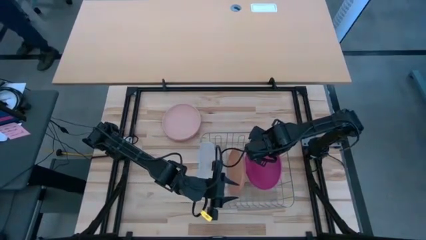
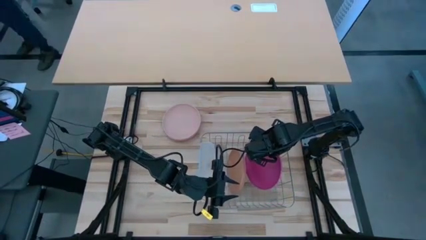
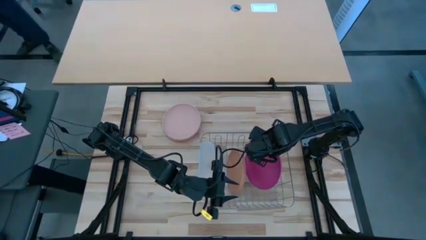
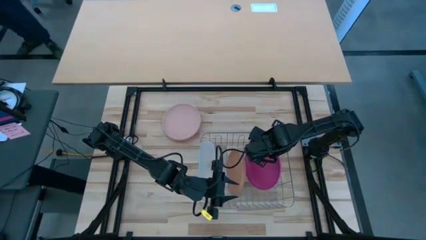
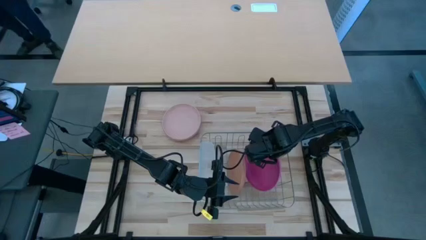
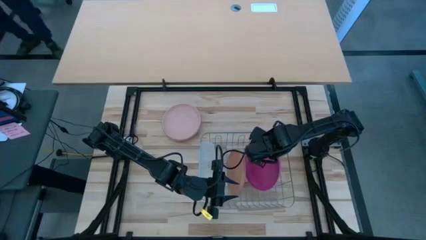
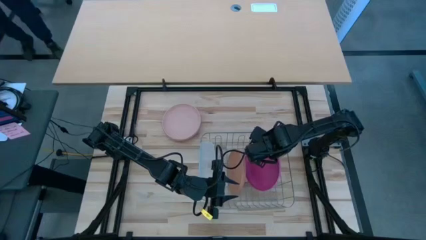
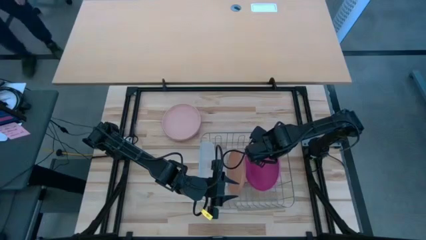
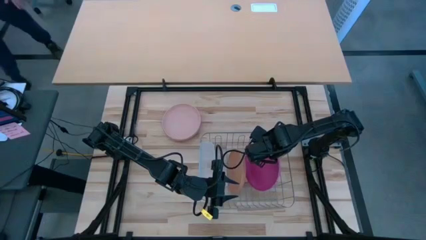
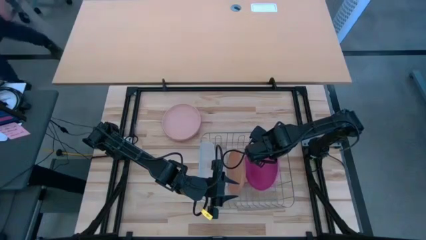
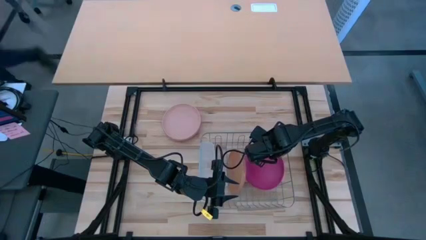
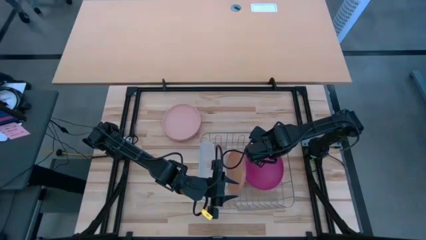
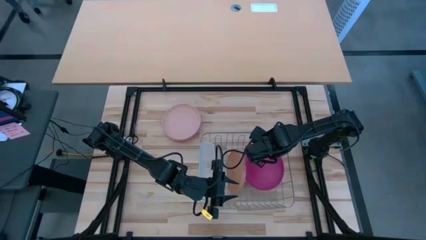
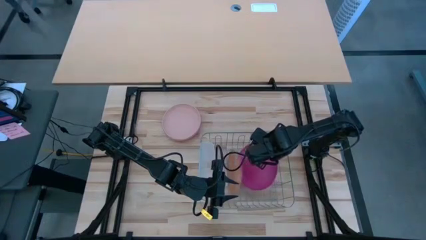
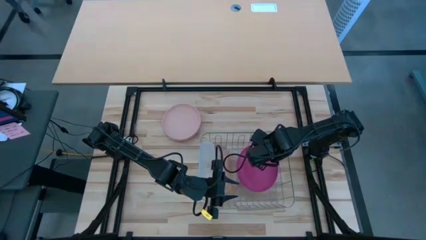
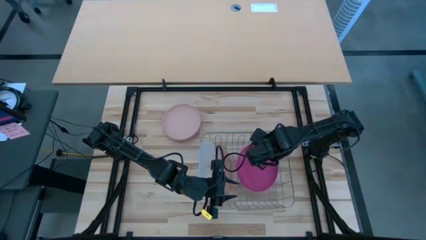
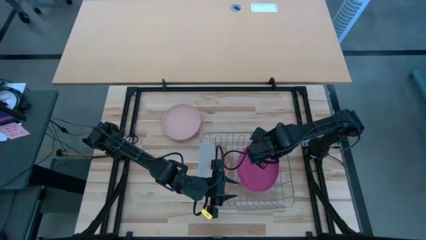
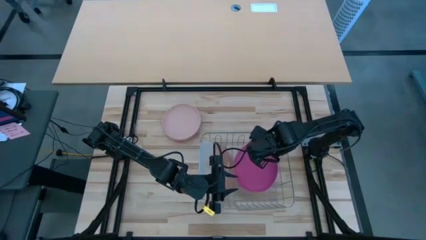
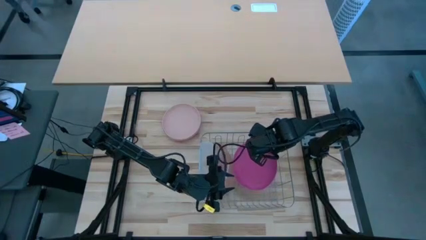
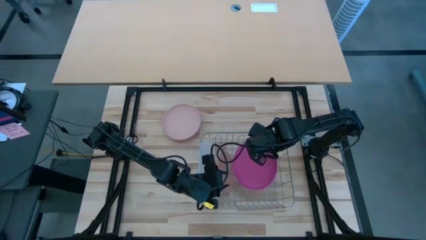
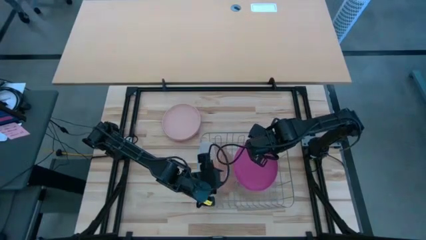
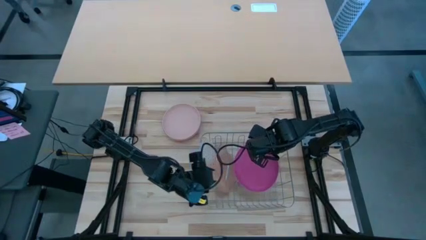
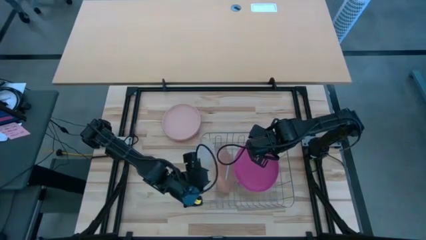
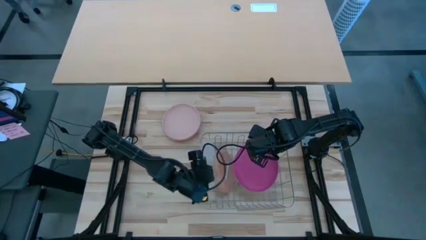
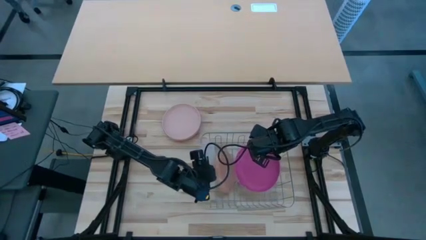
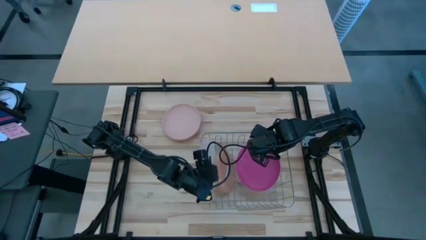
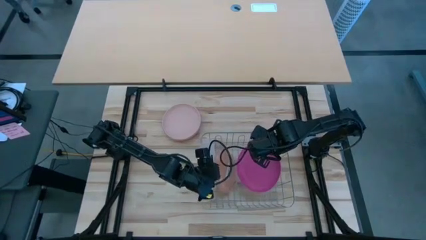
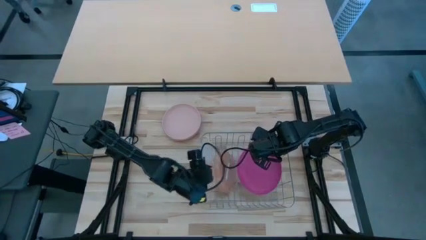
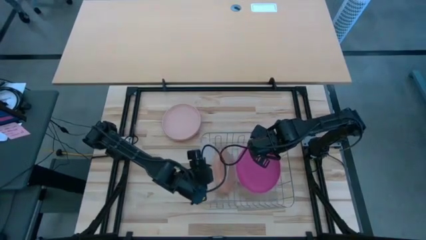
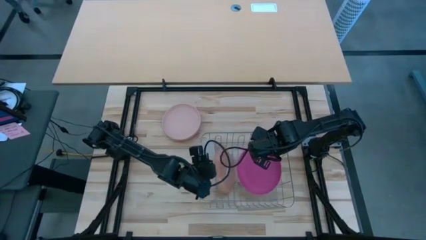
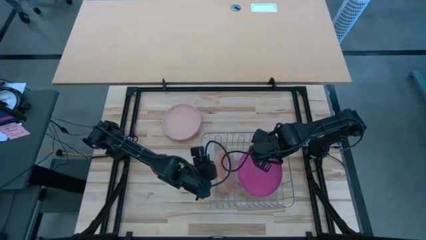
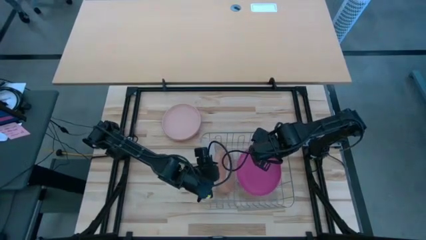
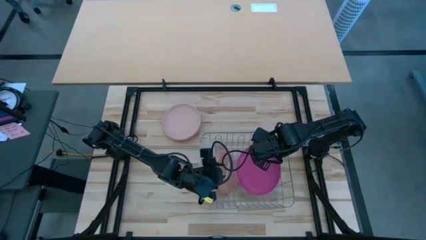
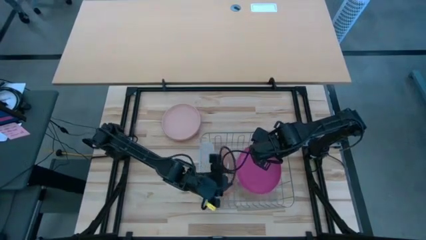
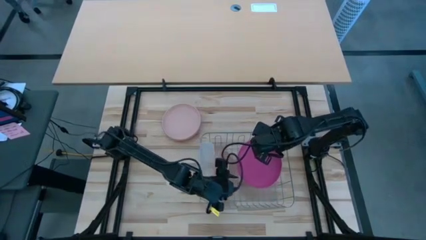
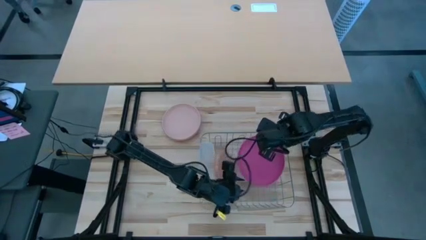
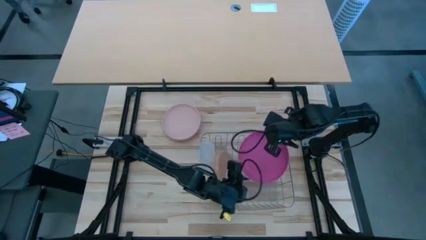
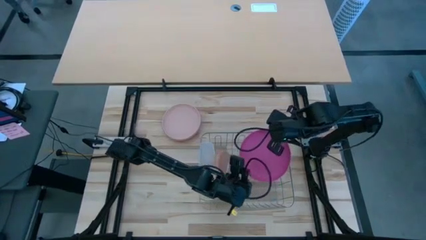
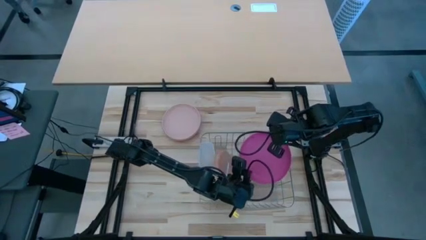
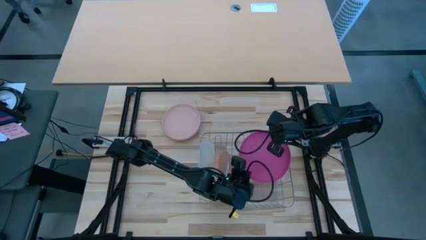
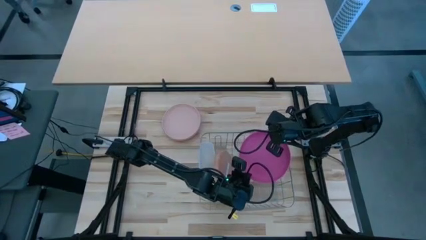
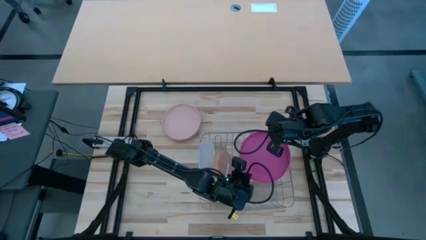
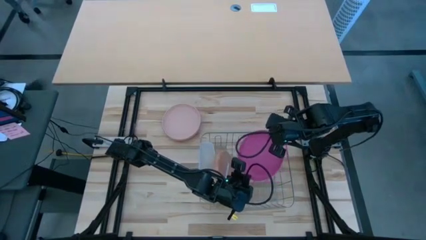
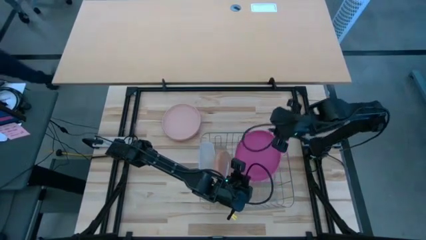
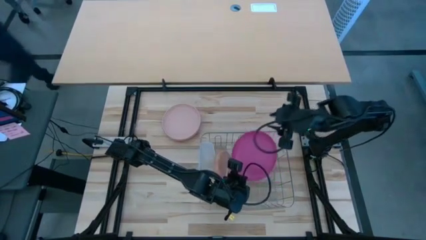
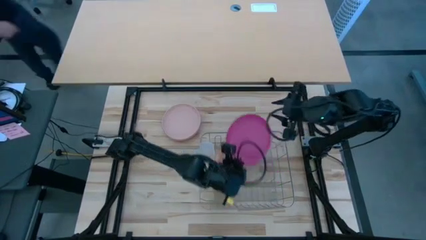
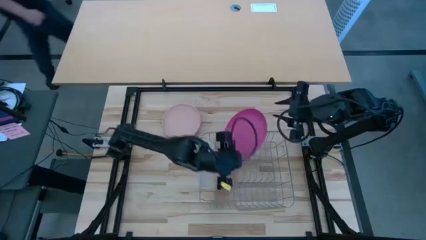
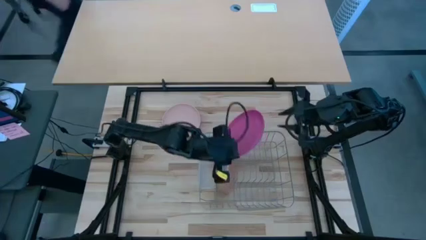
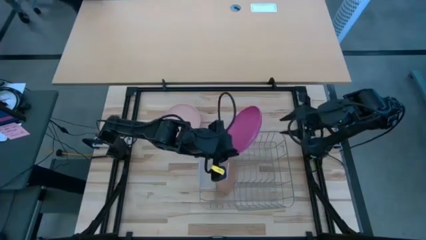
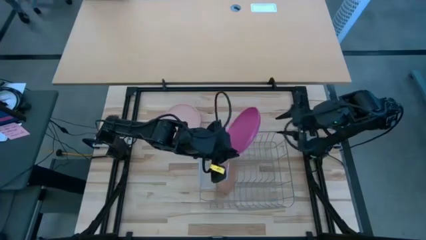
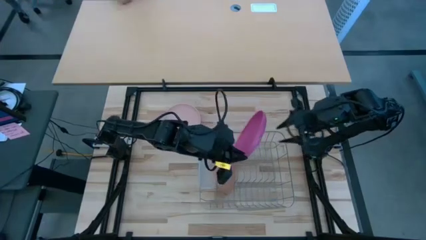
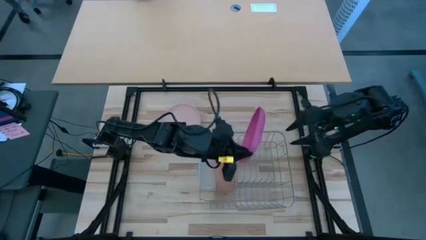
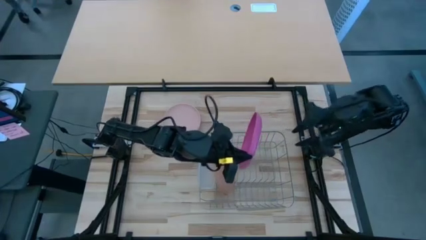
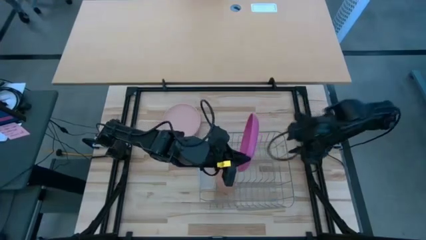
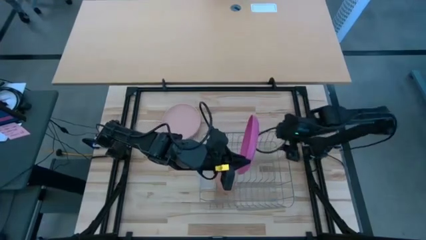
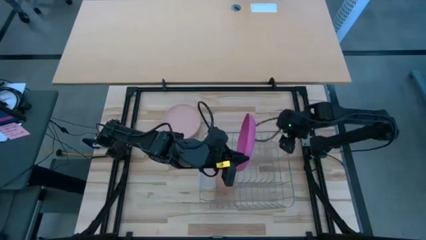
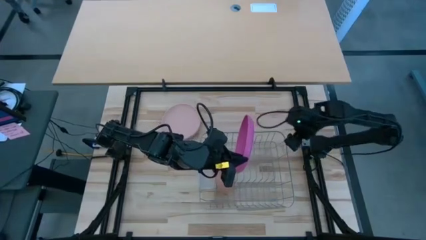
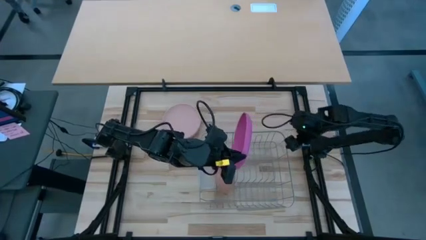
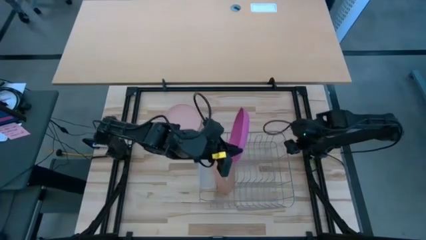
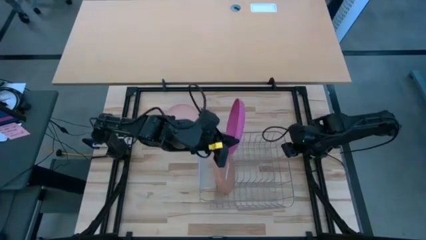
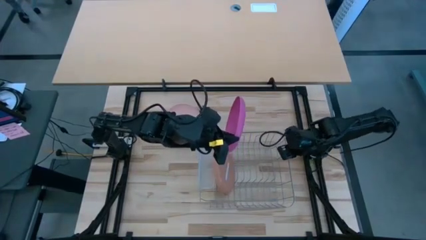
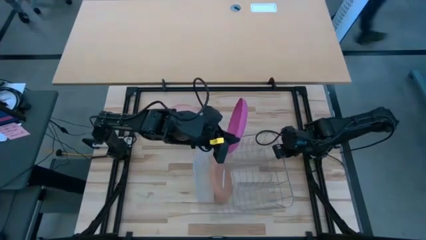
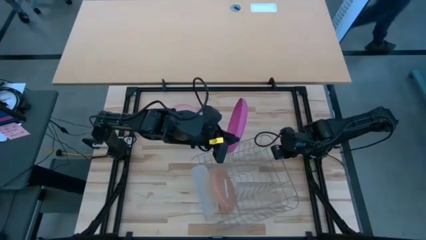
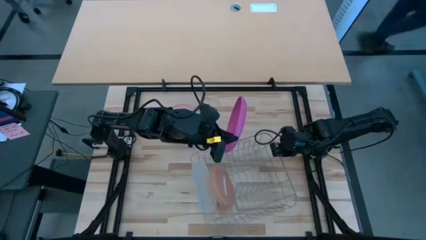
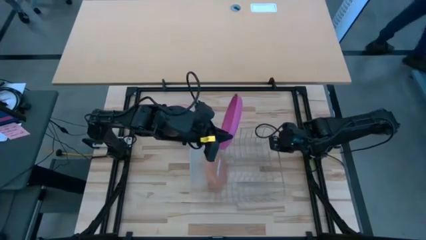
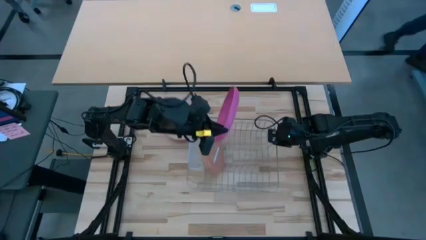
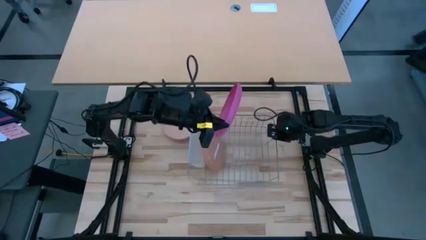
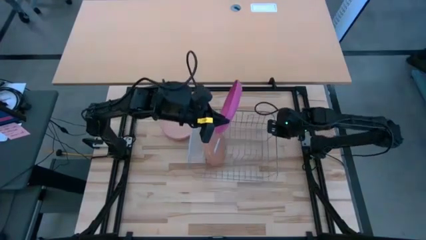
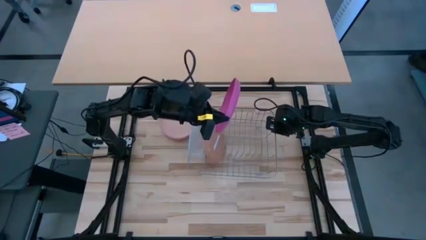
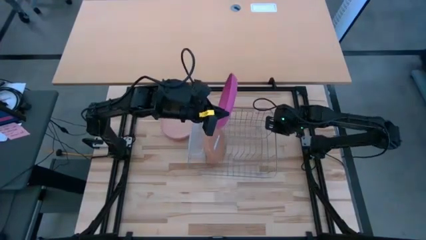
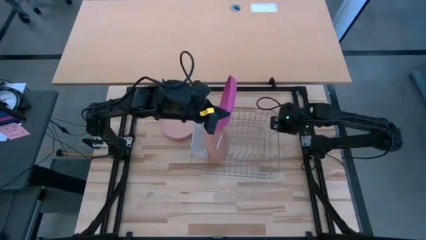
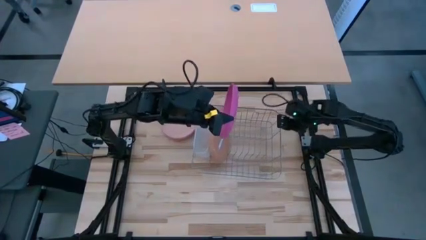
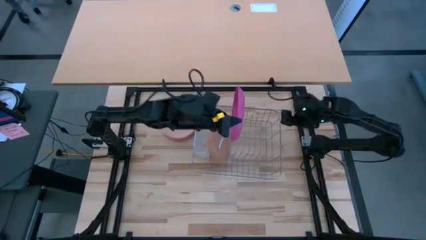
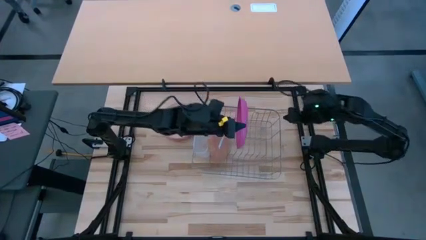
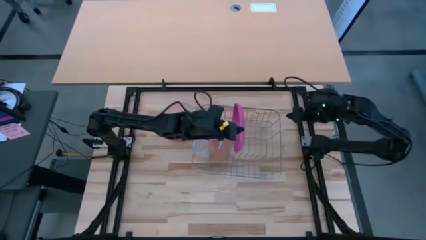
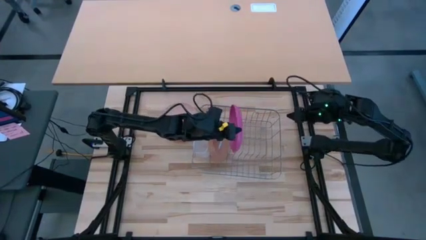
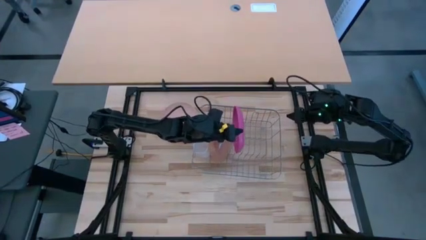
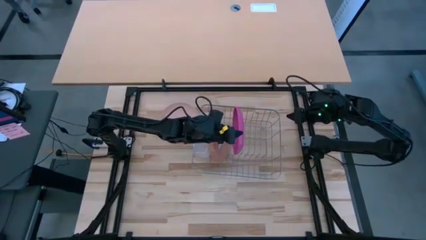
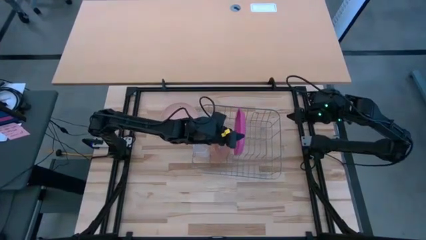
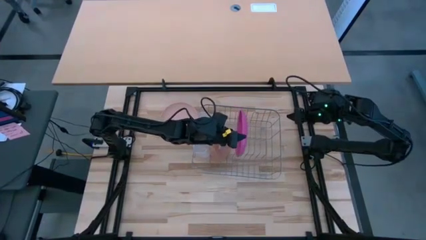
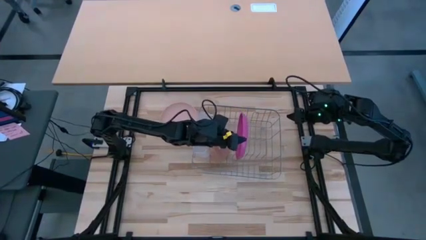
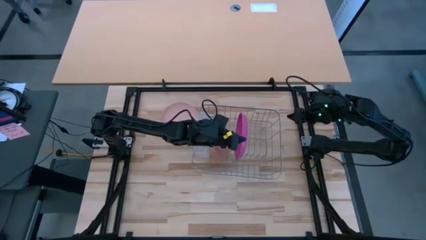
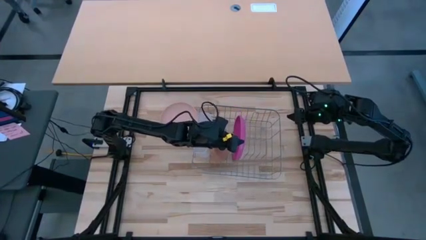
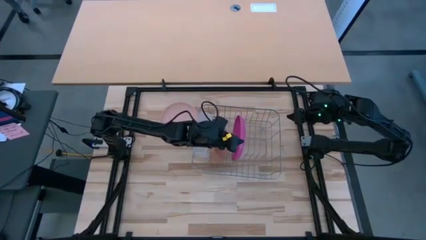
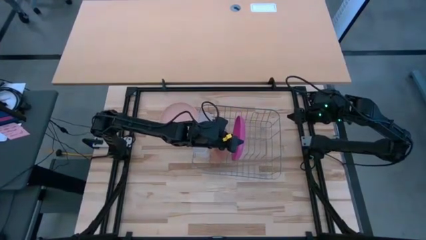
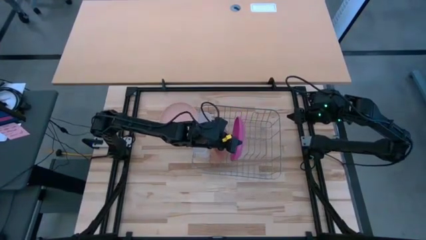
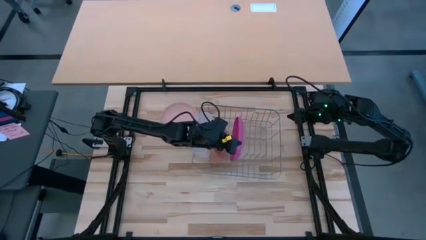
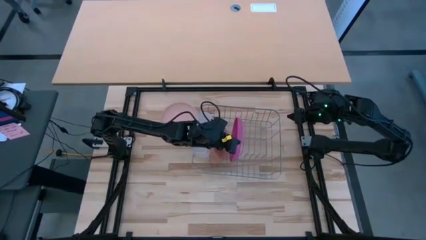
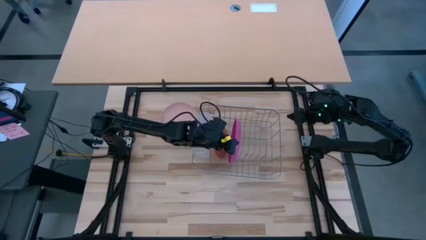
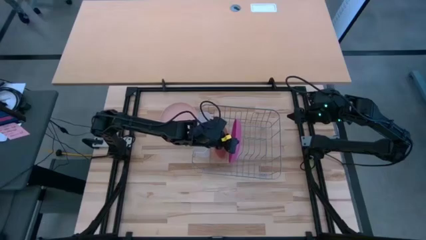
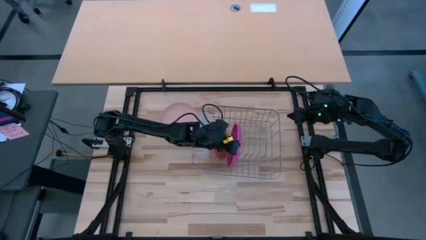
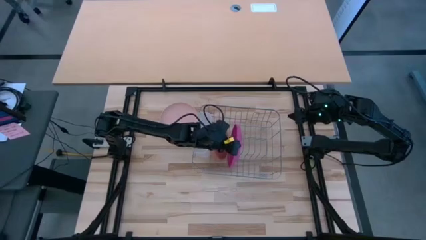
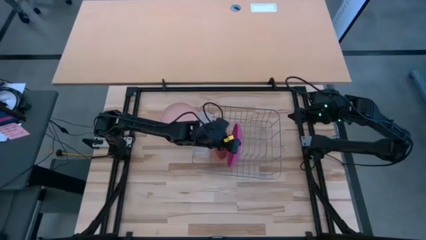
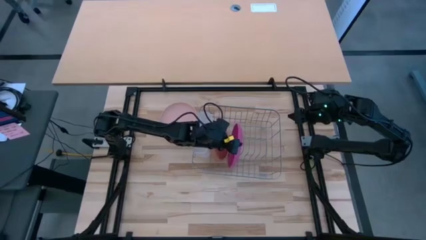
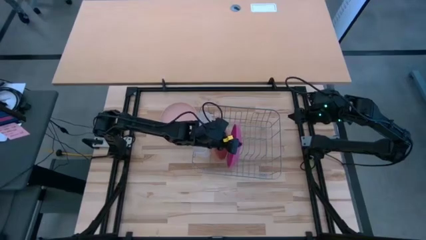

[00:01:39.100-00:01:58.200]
Task: Sort dishes
Put the pink plate in the dish rack
